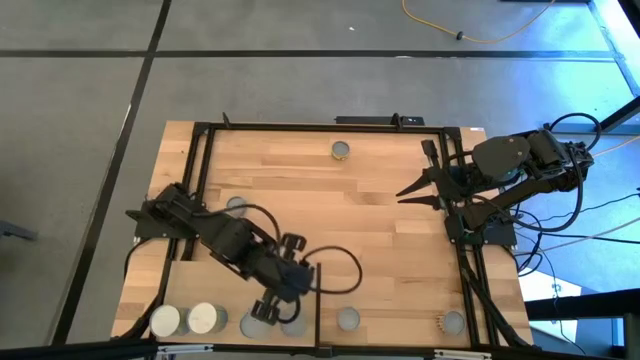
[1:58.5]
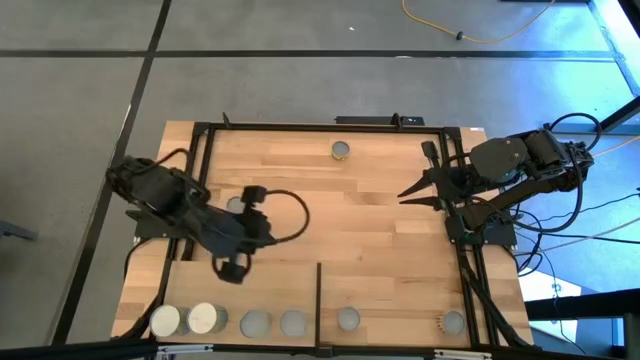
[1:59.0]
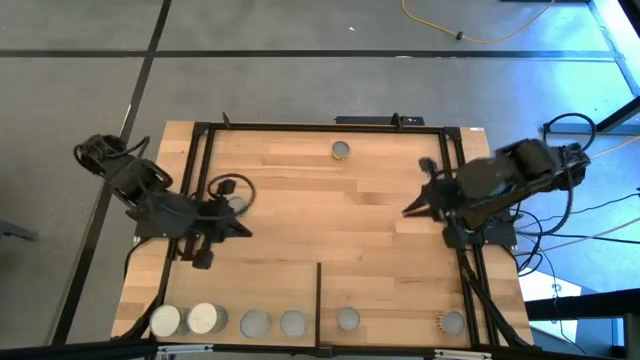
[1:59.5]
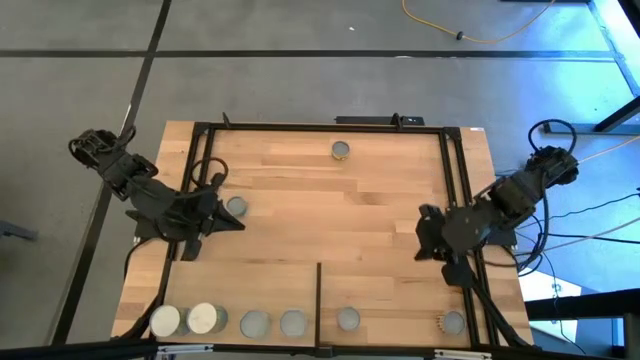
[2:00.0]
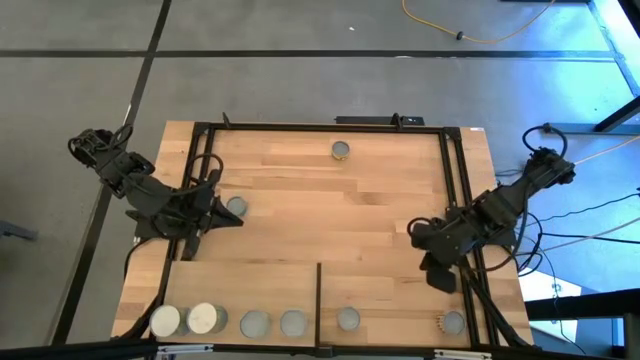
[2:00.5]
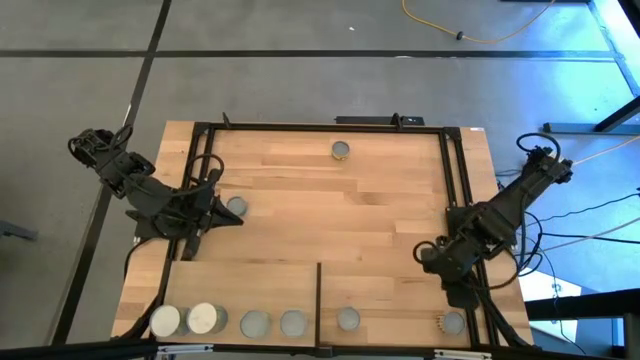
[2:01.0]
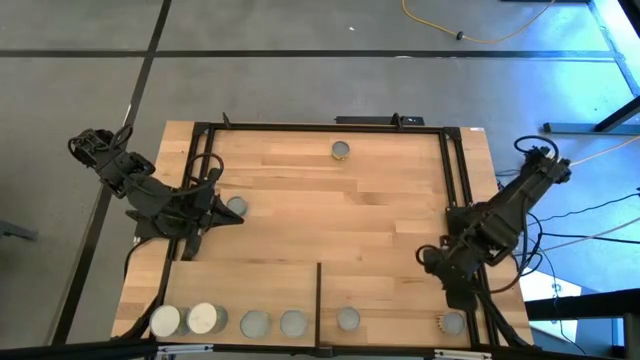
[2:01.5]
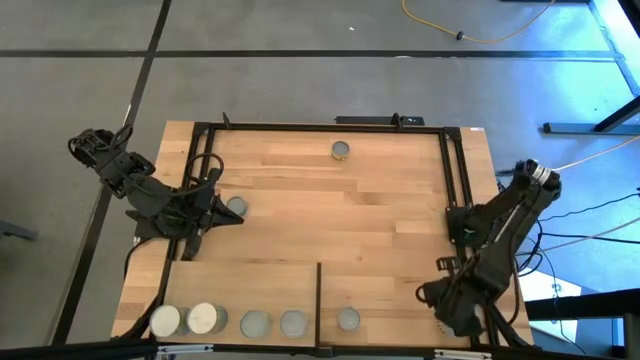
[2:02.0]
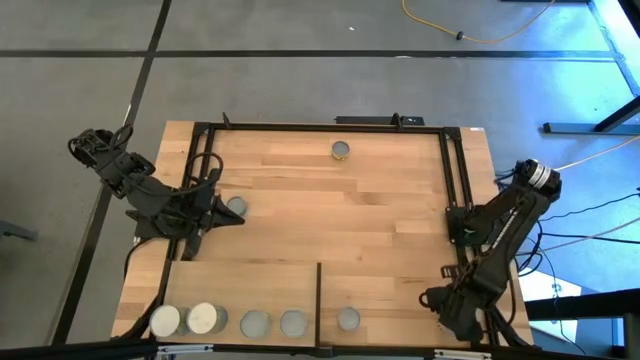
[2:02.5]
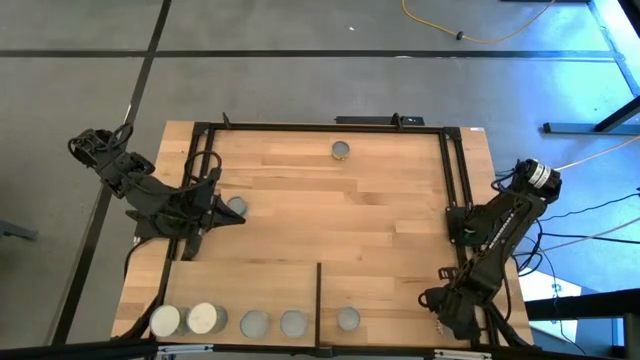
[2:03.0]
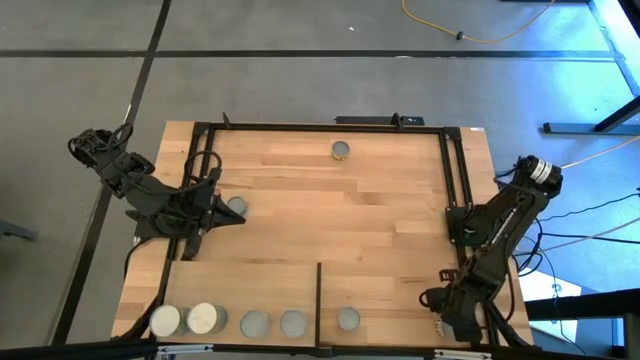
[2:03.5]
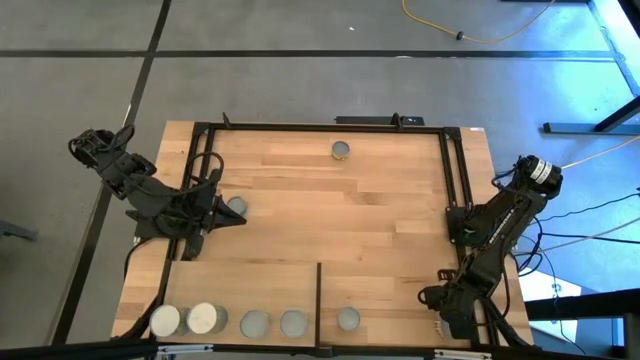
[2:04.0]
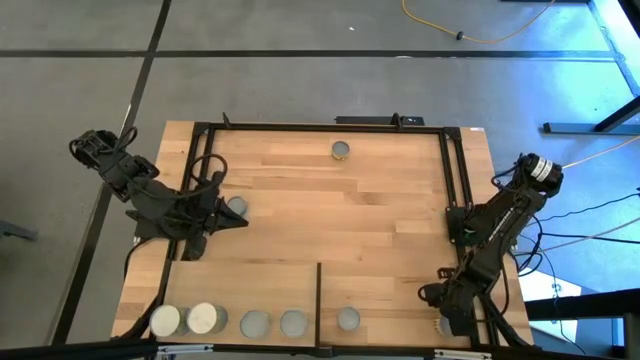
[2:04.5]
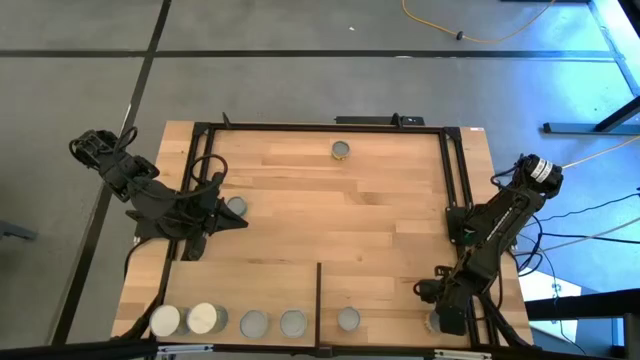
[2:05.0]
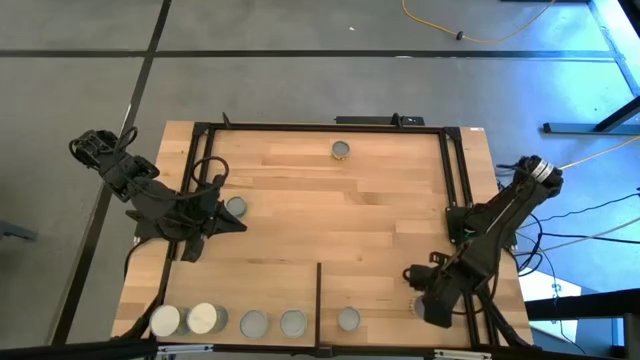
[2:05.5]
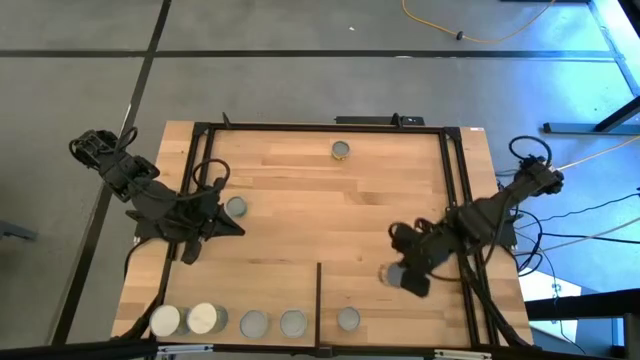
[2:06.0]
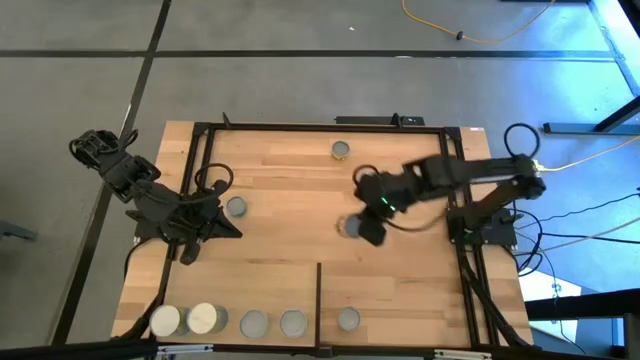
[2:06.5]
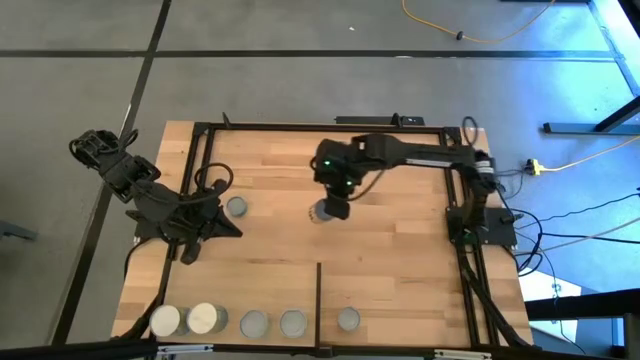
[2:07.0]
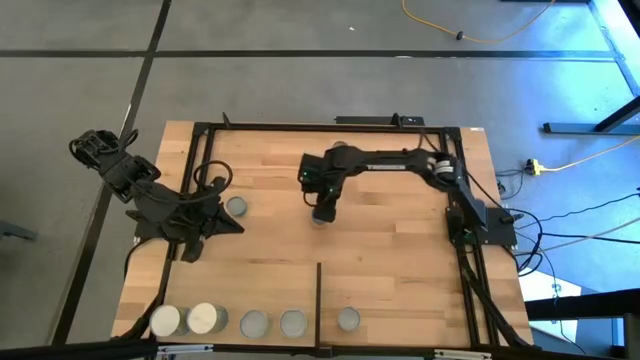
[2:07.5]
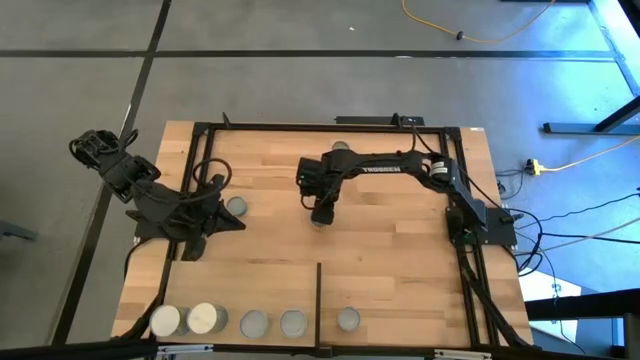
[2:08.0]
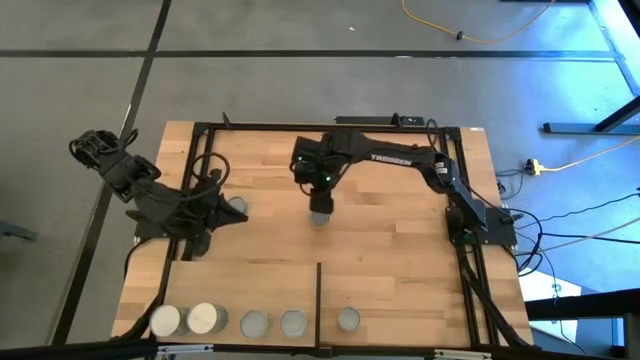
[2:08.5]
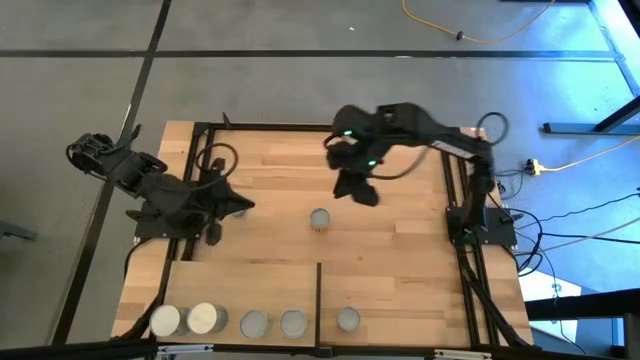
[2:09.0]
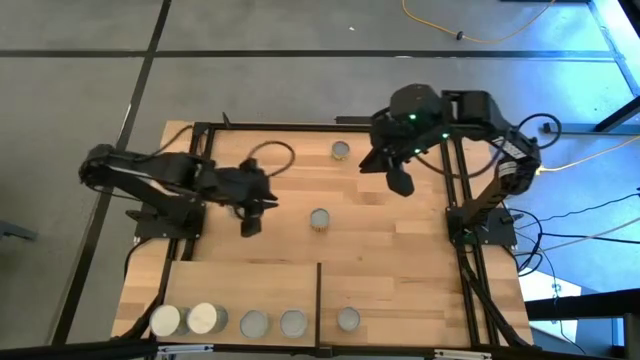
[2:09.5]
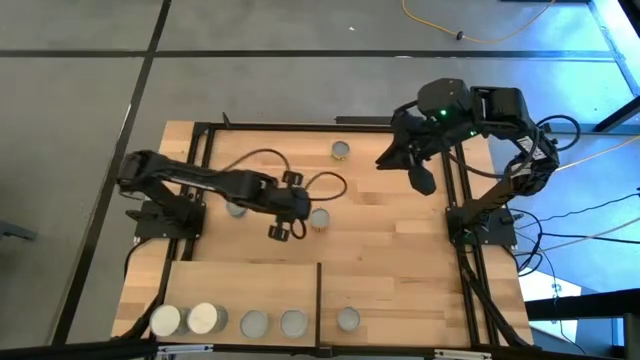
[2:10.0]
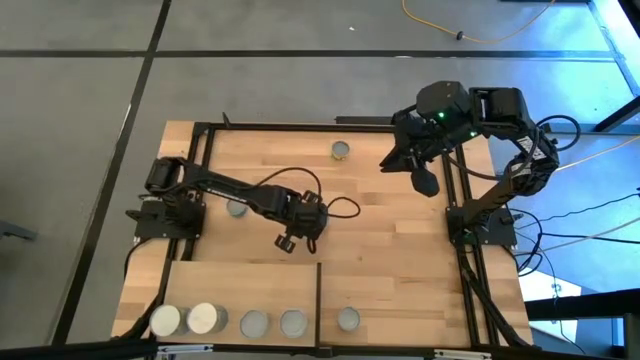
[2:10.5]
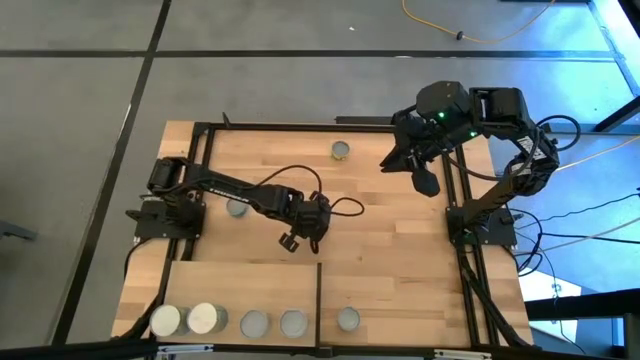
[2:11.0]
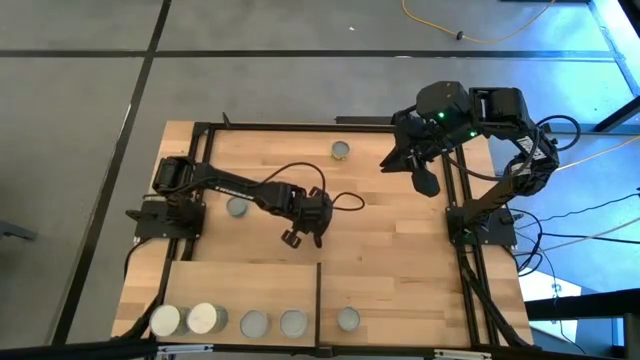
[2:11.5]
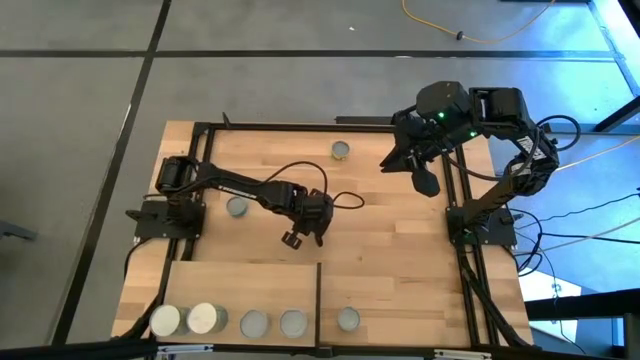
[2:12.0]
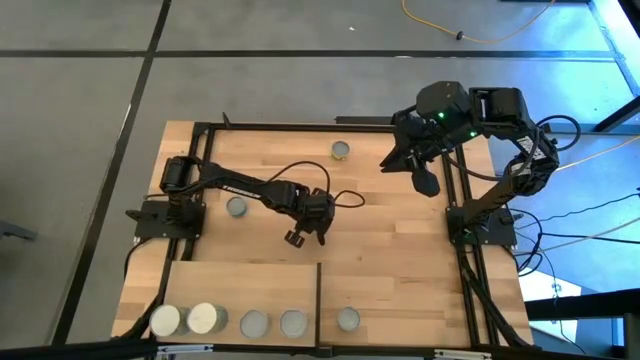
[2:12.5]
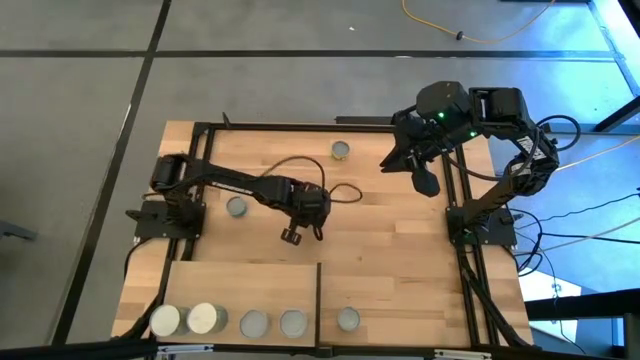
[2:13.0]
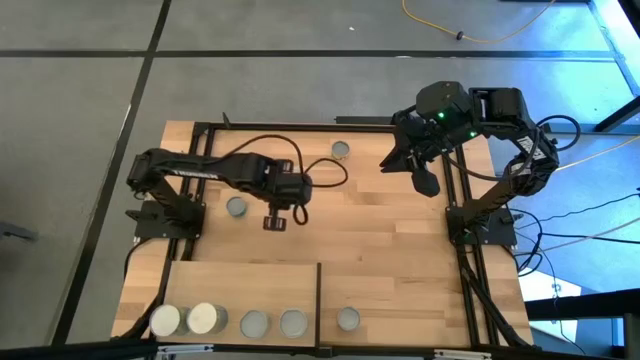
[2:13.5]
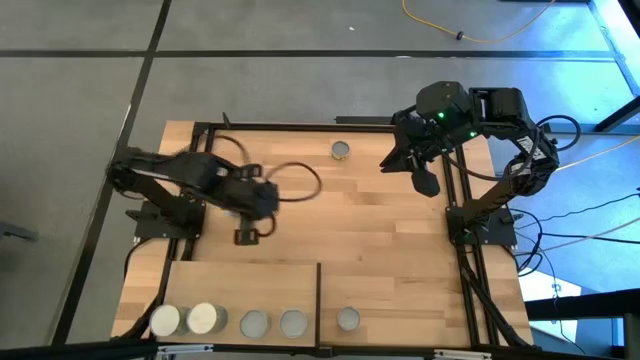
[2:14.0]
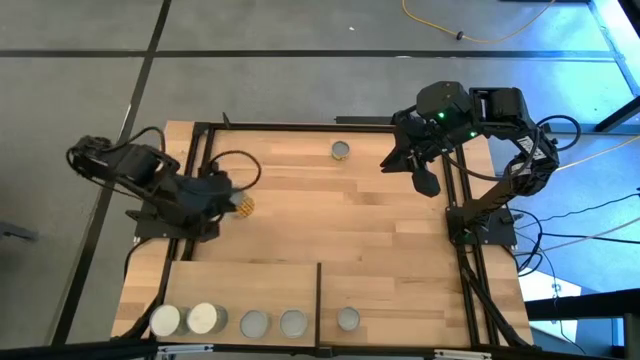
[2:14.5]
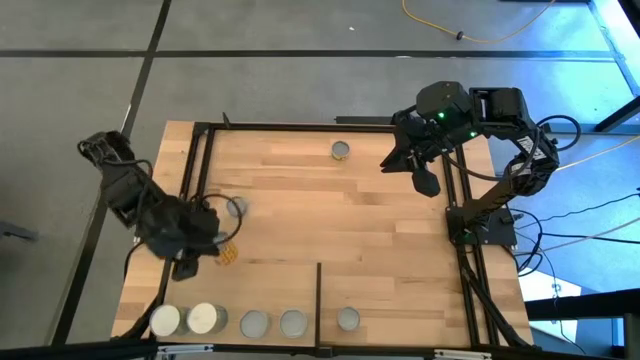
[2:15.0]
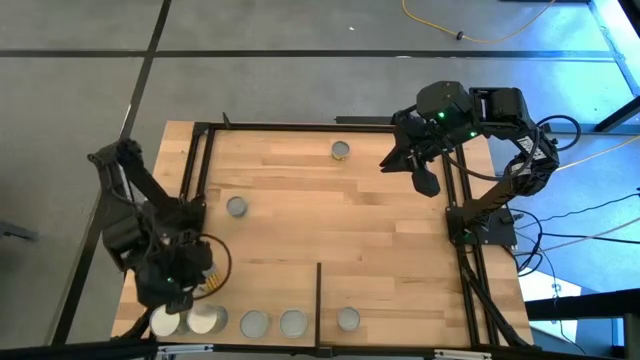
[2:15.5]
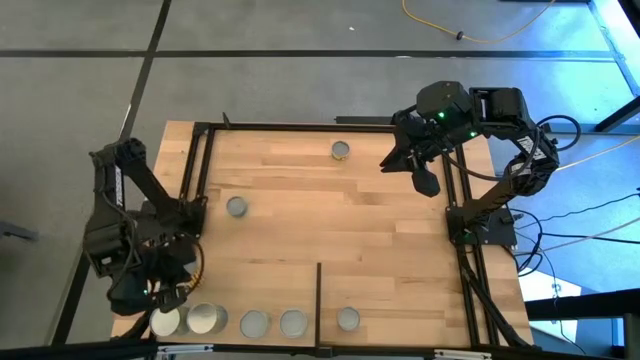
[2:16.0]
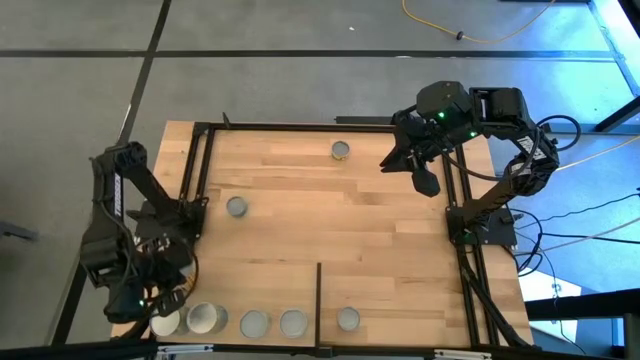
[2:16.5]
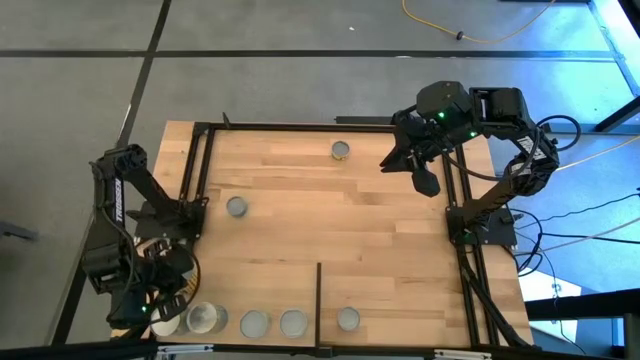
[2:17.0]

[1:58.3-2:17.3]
Task: Pick and place cans onto a shelf
Put the yellow can on the shelf

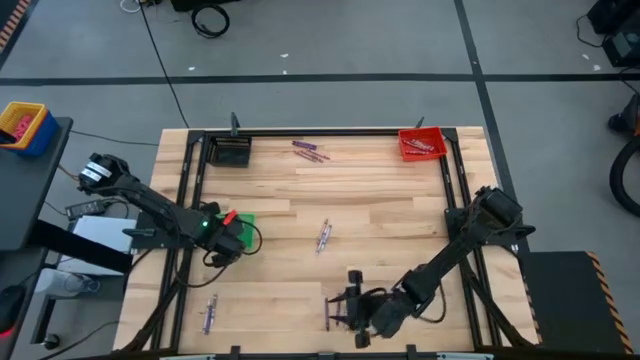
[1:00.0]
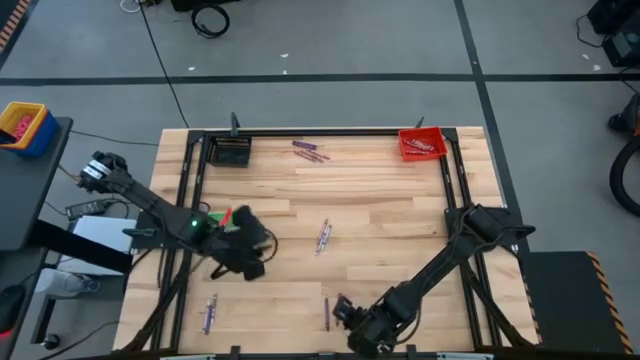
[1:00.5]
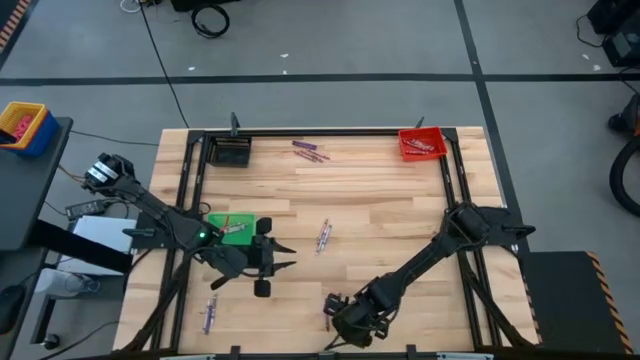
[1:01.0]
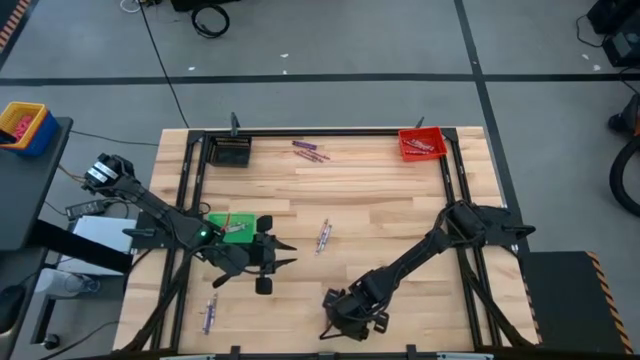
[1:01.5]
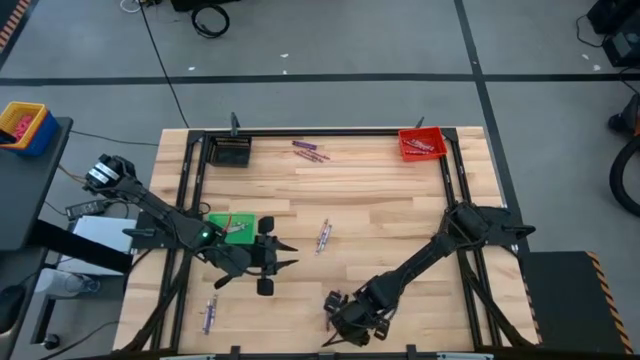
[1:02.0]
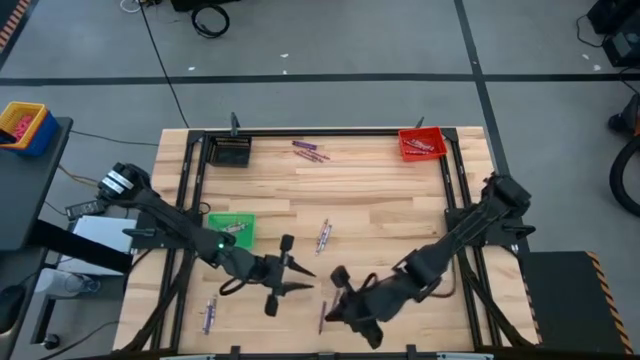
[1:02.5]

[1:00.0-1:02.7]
Task: Sort crayons
Put the white crayon into the green bin
